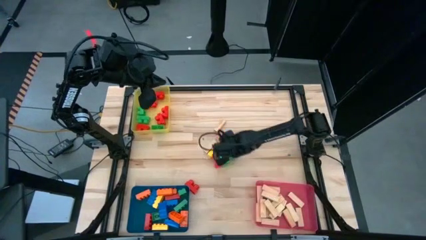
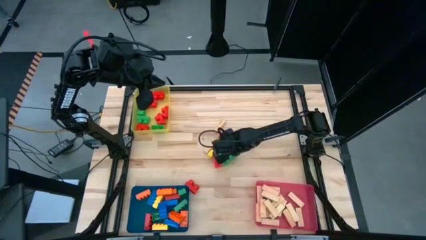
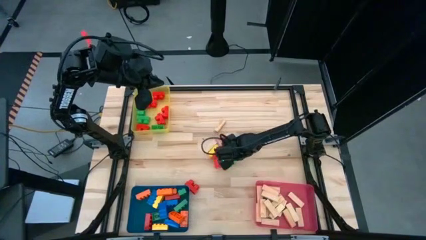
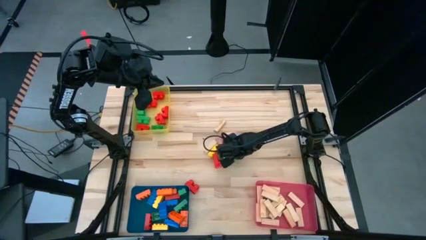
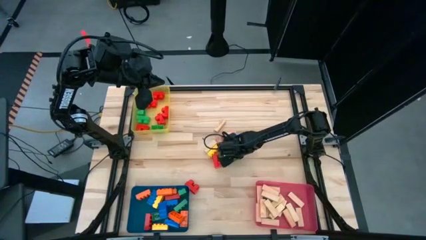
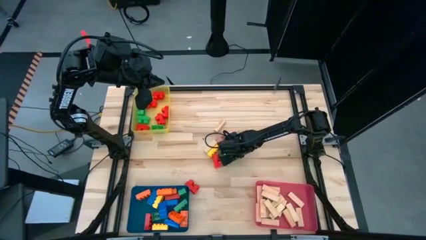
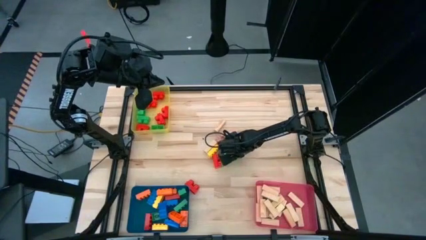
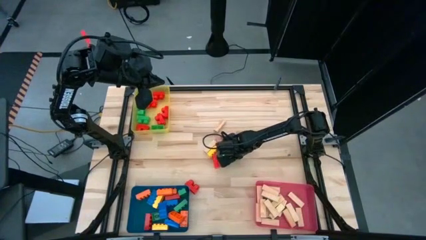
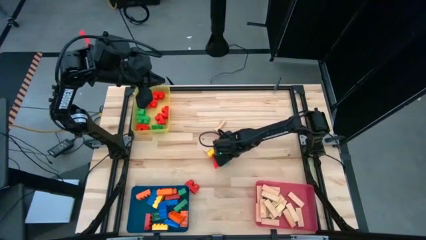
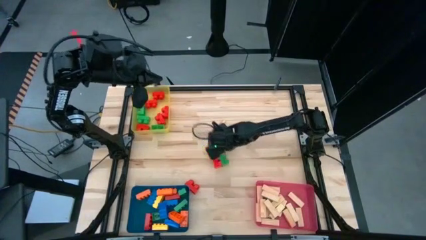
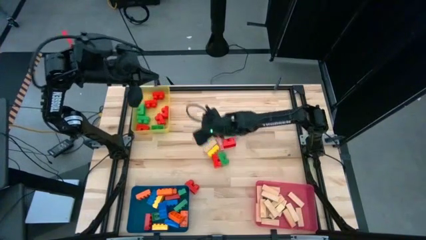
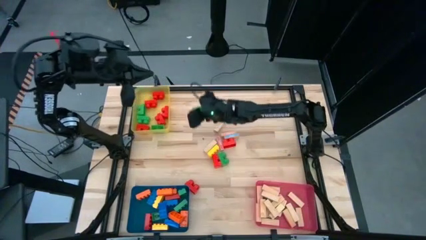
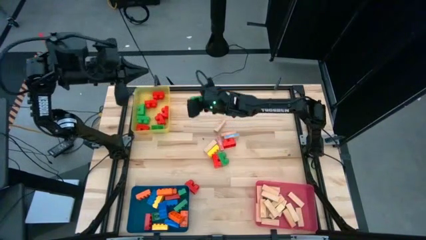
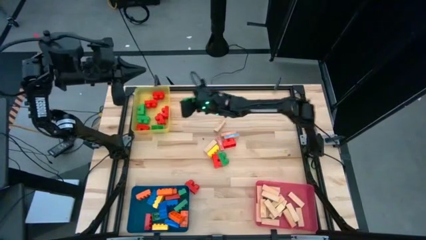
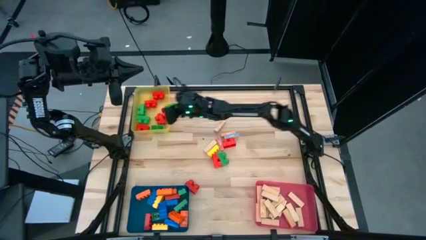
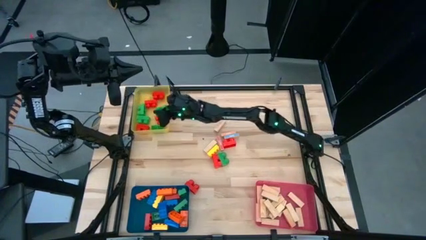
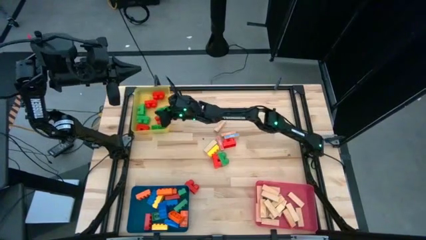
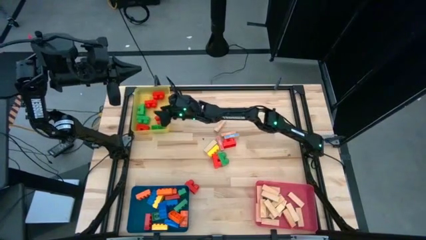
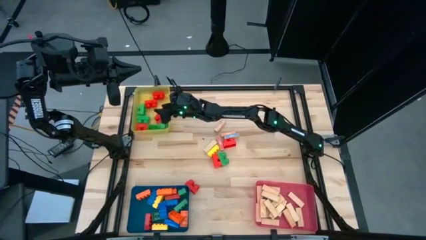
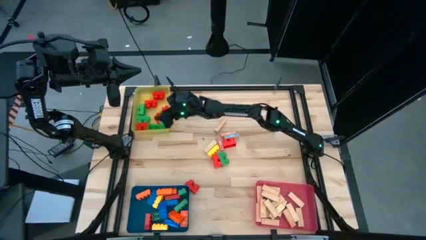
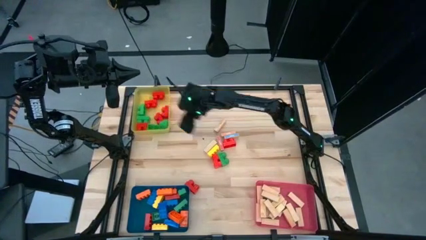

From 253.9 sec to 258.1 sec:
Task: Sort blocks by size
Put the round green game piece into the yellow bin

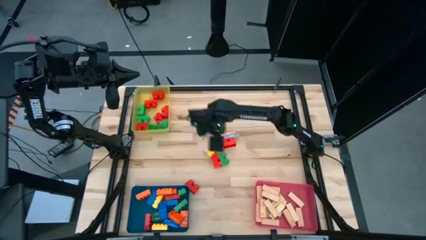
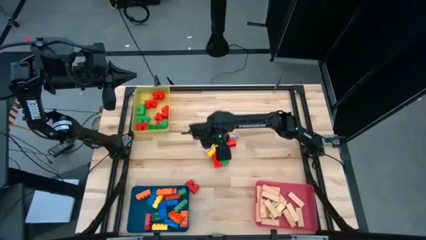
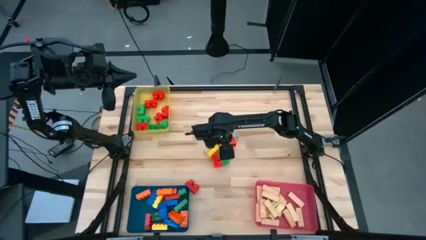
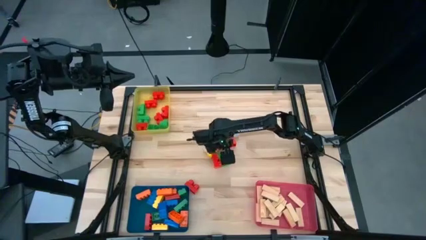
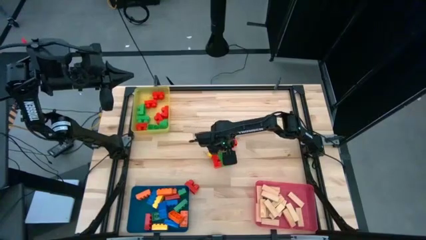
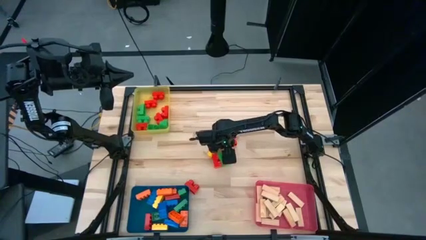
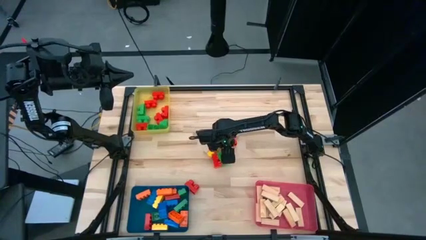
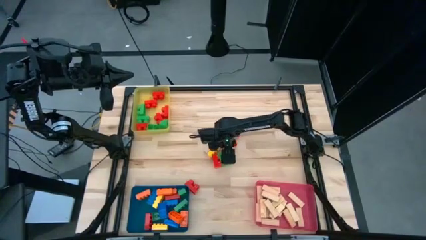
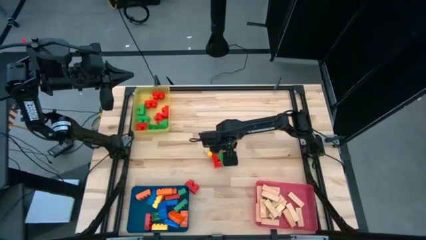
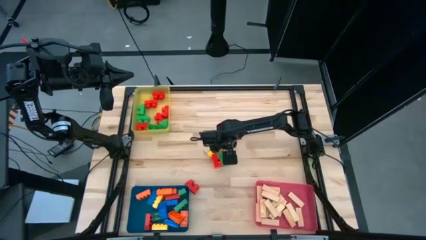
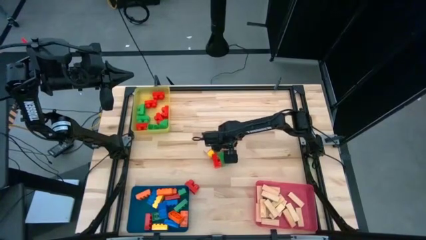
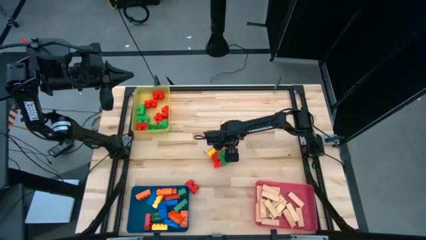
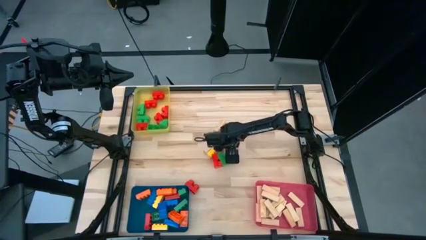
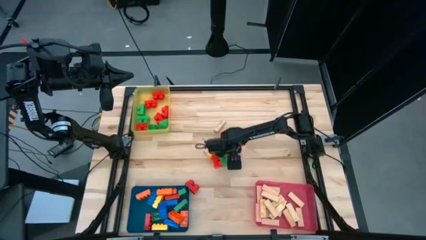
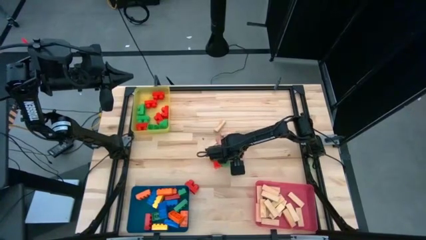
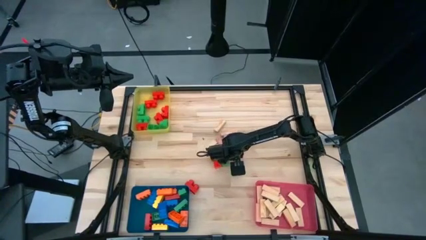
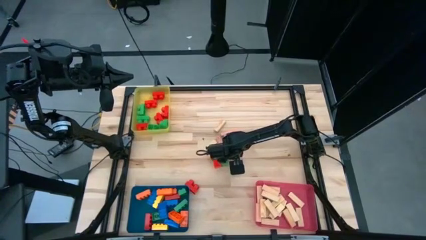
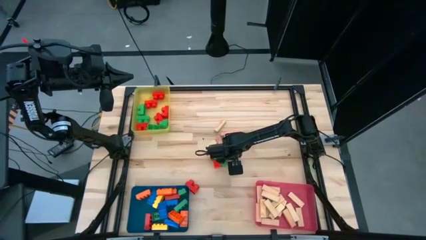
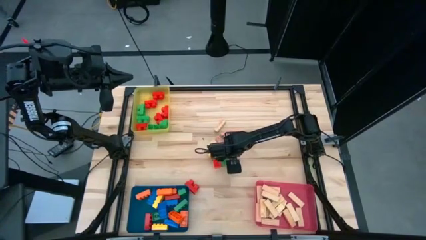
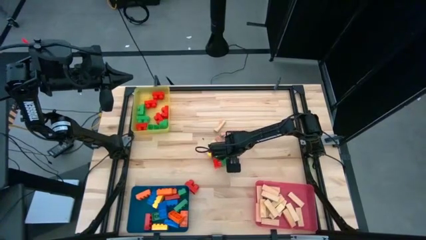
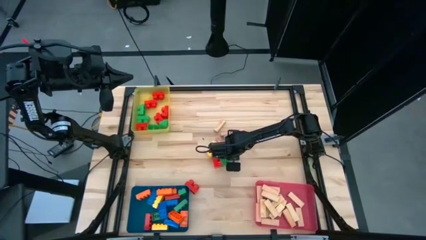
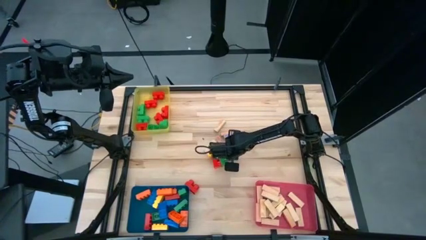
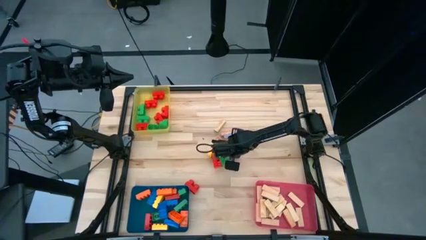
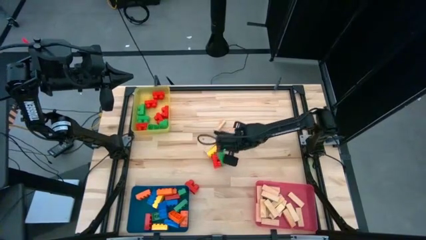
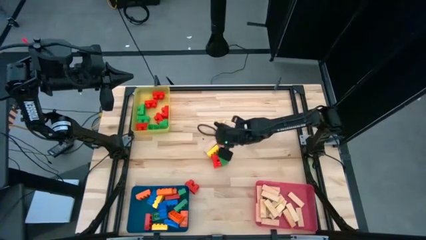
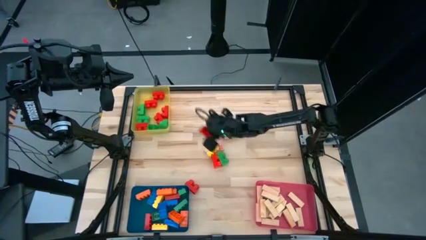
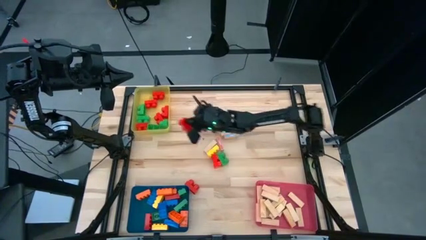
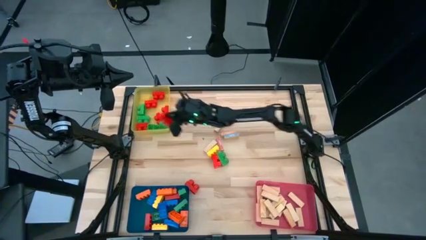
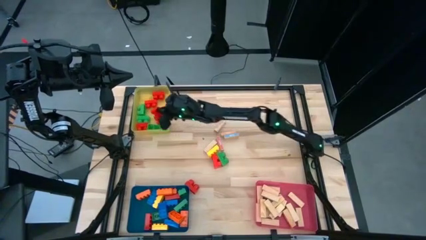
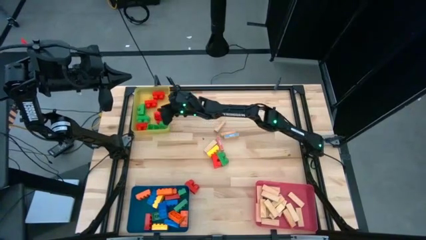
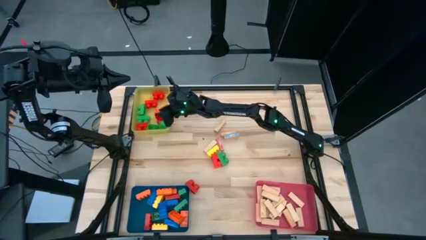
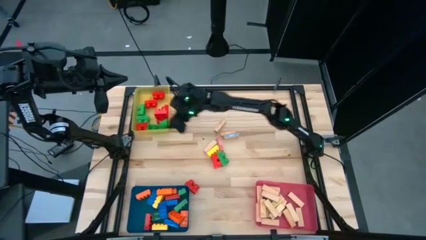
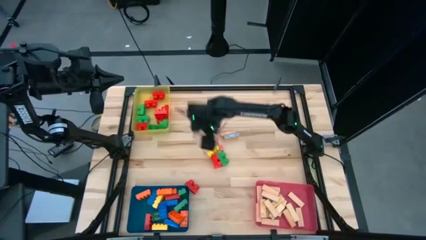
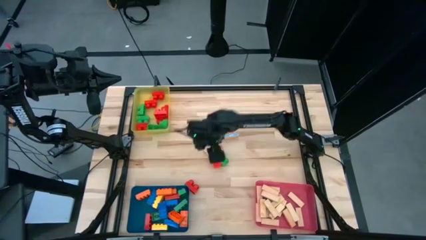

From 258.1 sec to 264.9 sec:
Put the round orange game piece into the yellow bin

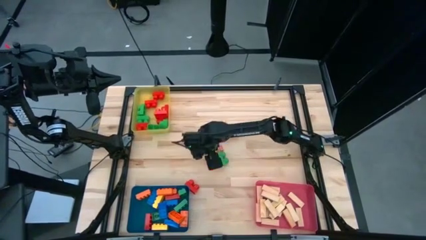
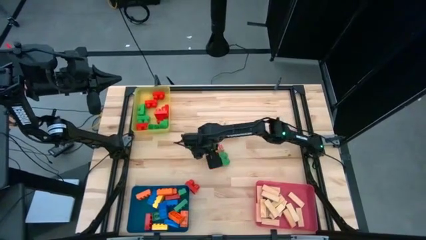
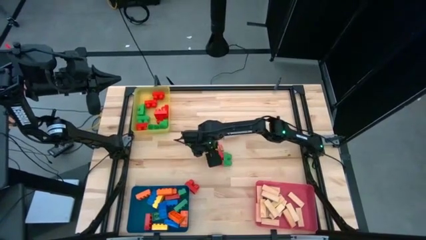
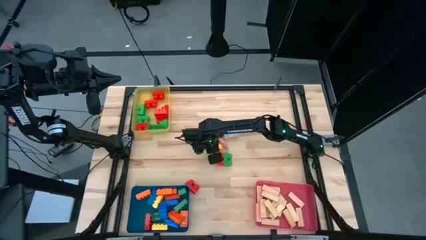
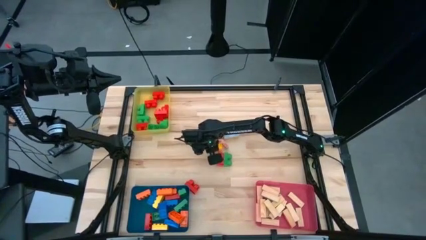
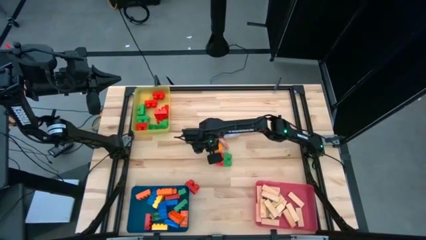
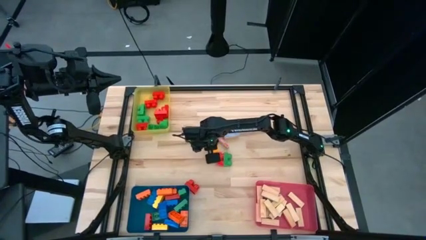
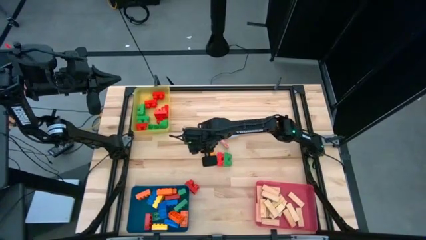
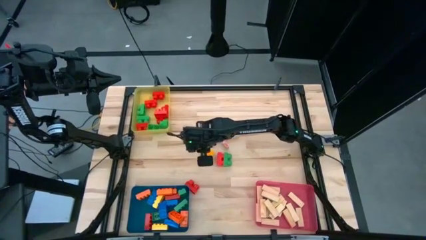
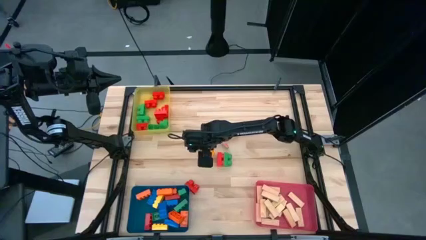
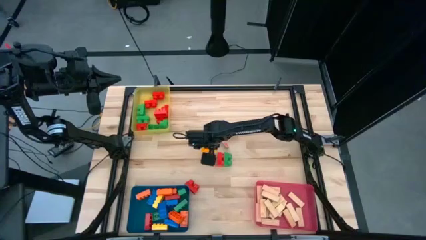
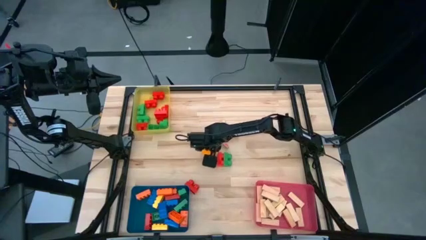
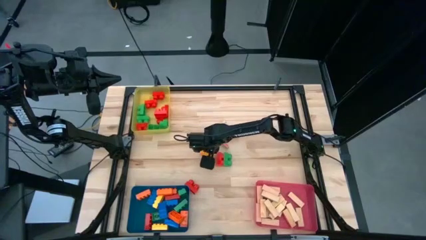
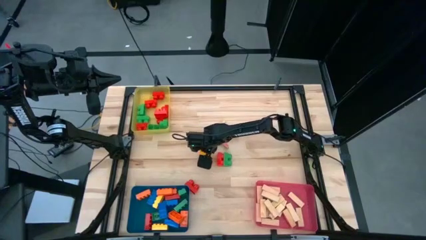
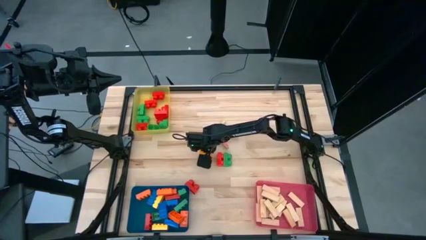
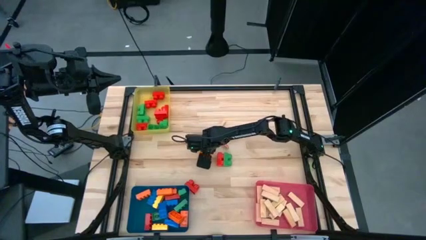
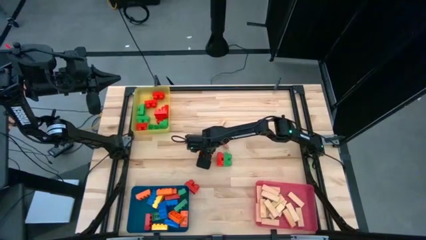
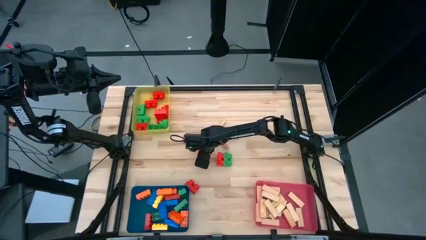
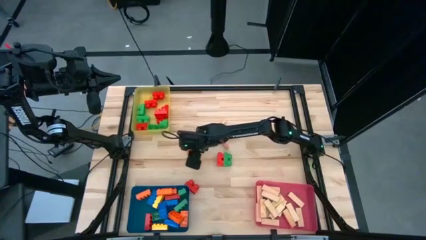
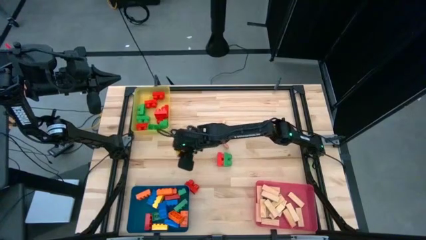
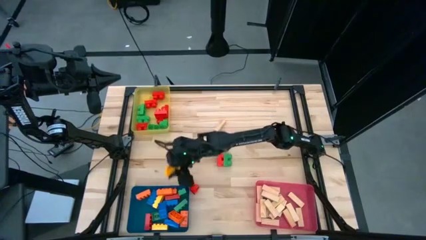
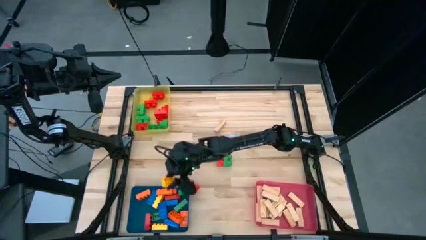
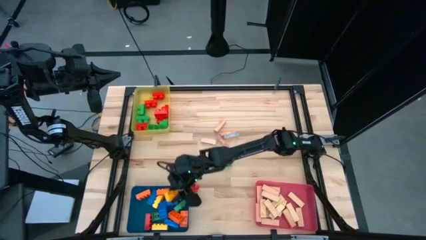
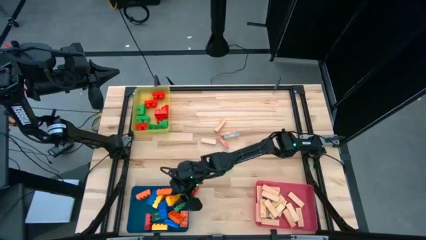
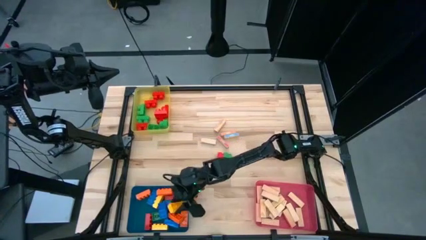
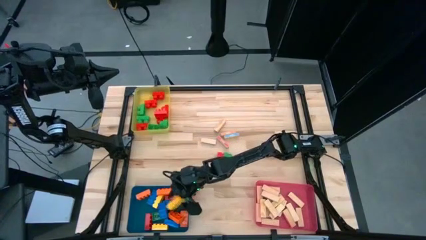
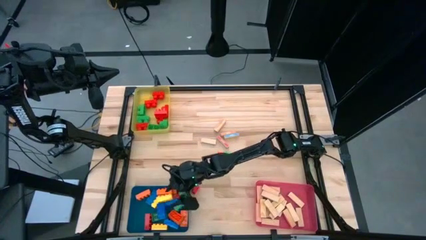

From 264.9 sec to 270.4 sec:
Put the yellow game piece into the blue bin
